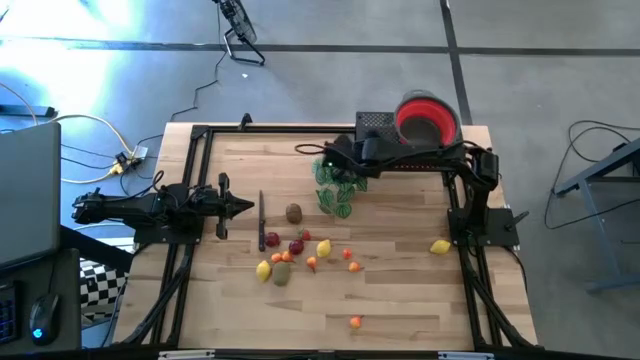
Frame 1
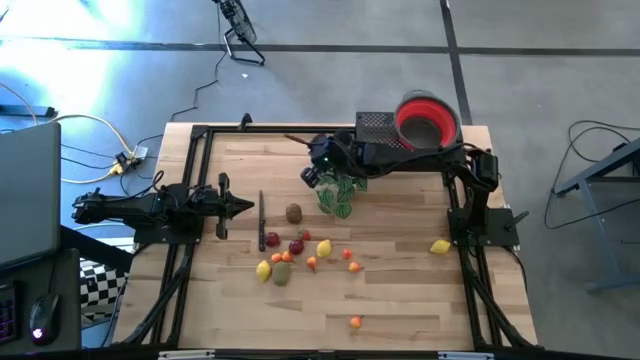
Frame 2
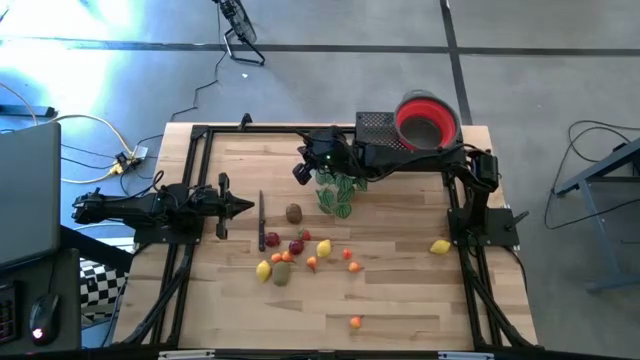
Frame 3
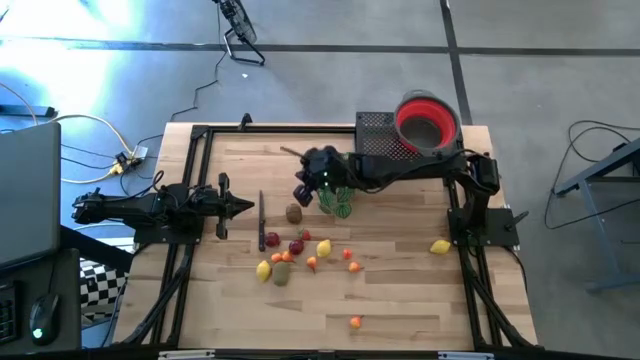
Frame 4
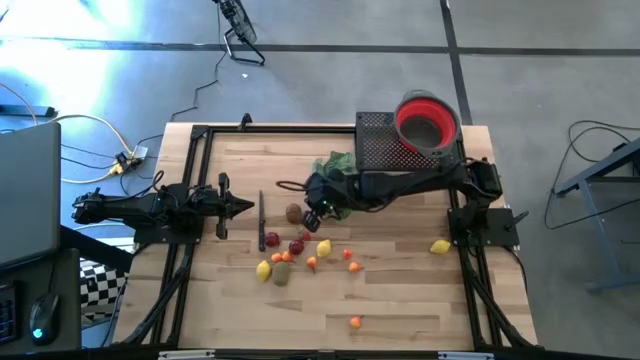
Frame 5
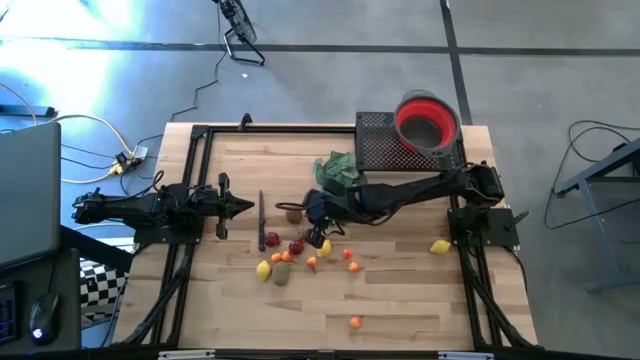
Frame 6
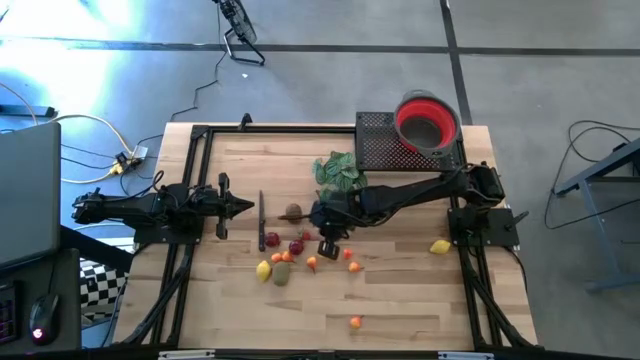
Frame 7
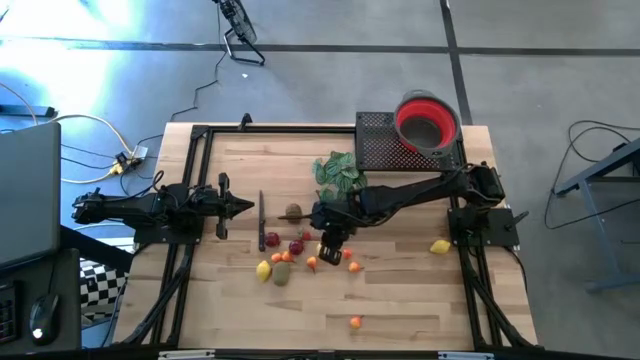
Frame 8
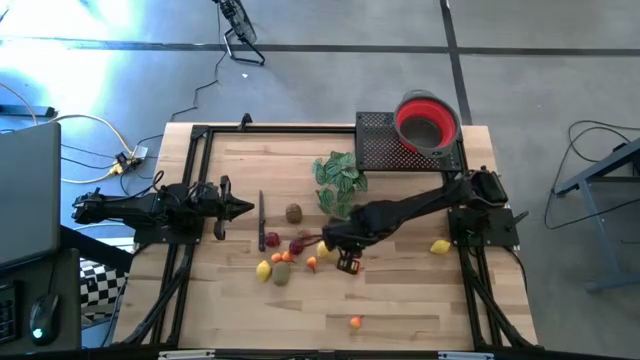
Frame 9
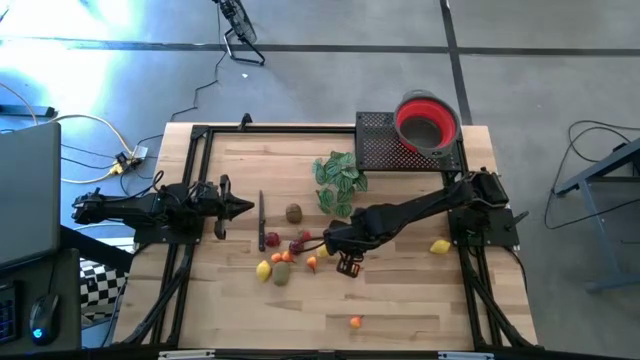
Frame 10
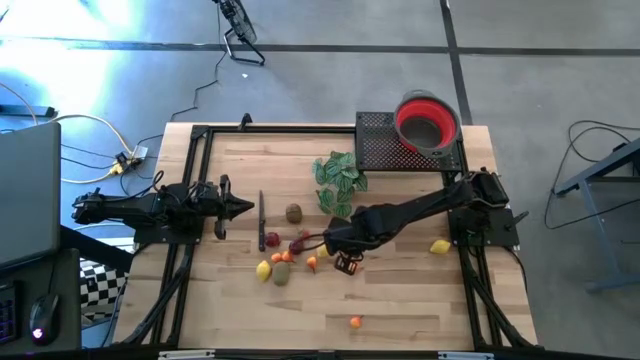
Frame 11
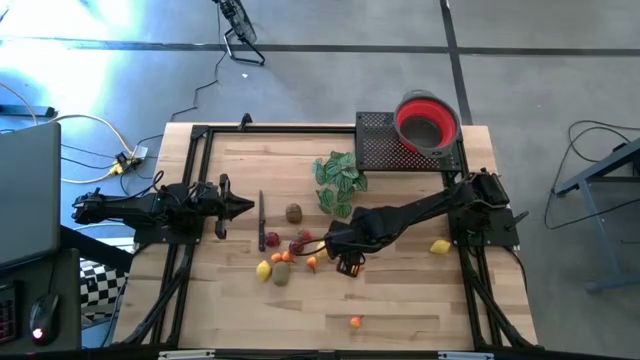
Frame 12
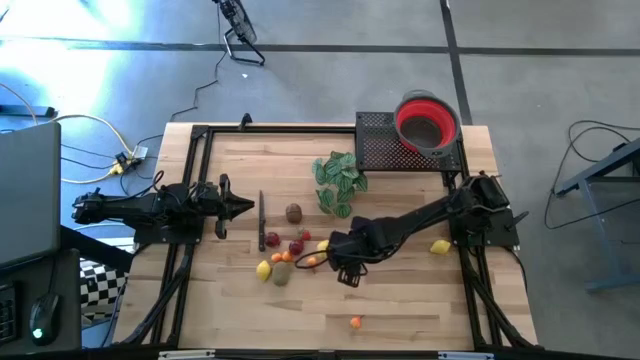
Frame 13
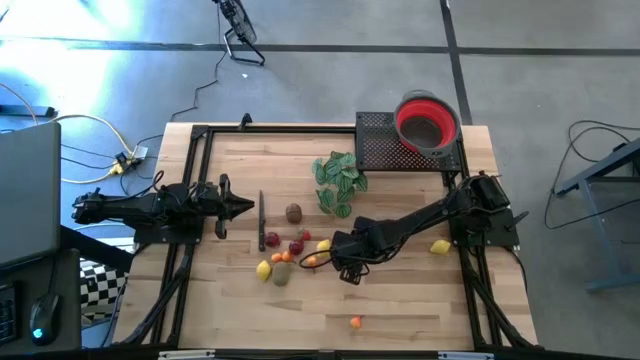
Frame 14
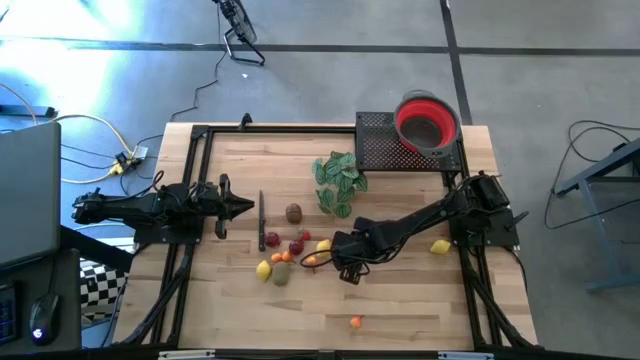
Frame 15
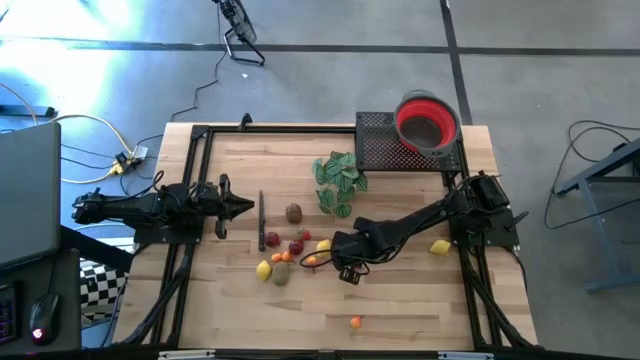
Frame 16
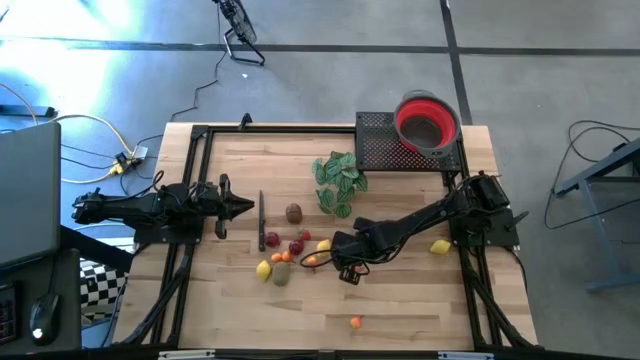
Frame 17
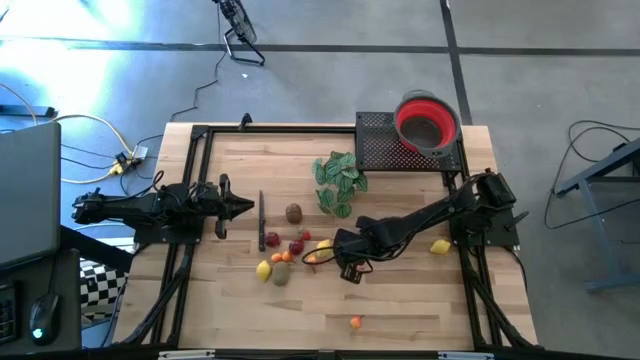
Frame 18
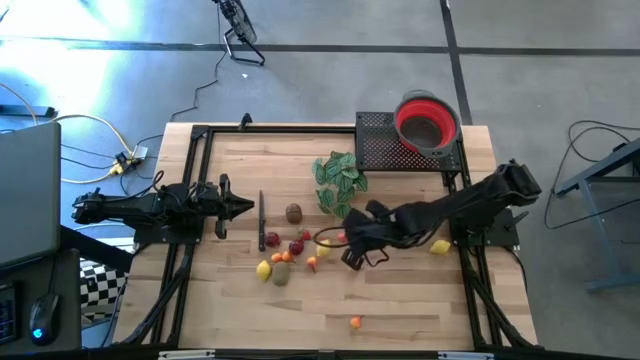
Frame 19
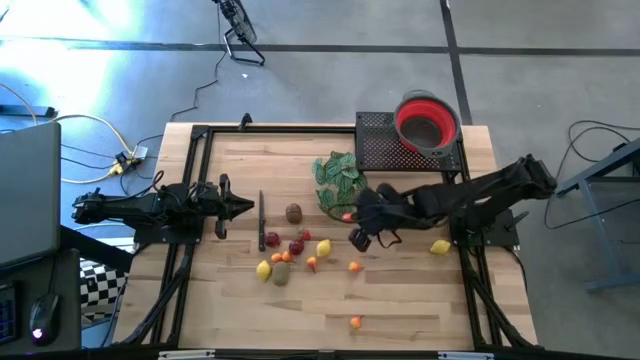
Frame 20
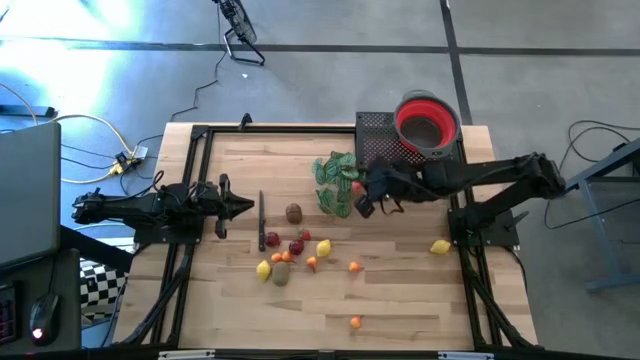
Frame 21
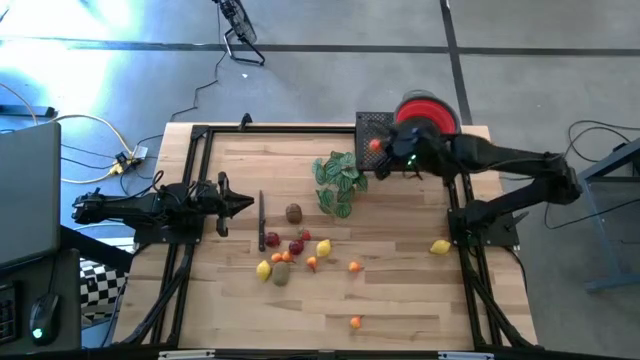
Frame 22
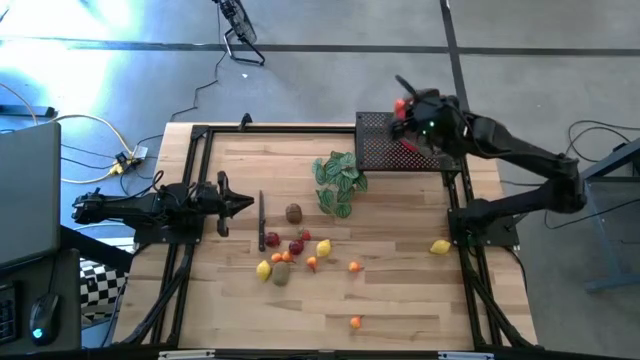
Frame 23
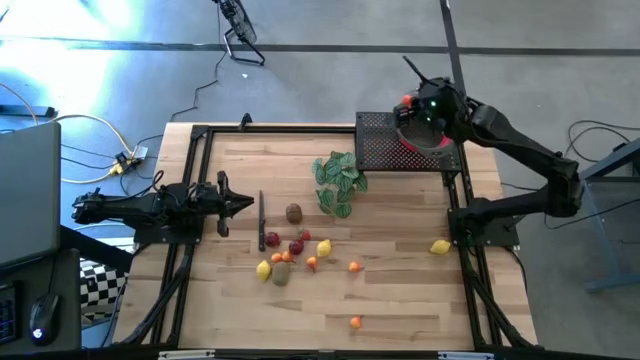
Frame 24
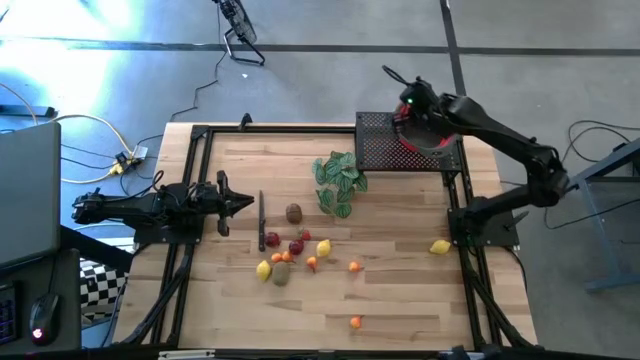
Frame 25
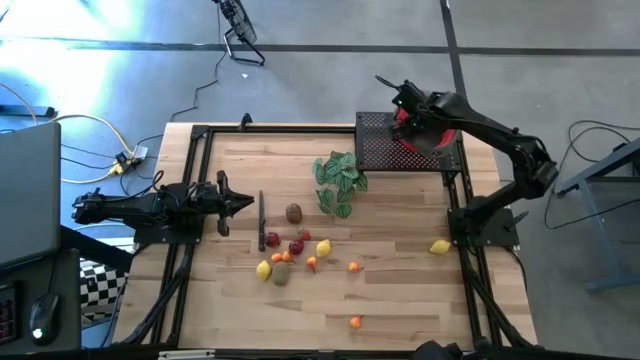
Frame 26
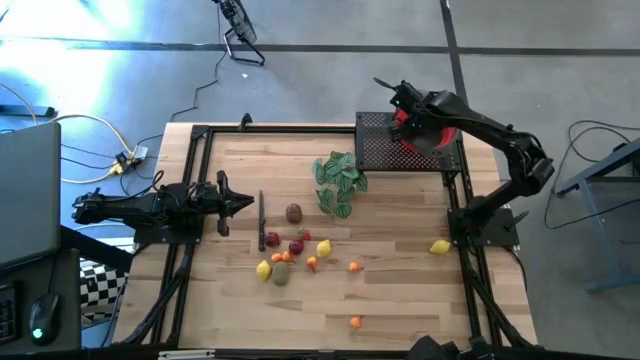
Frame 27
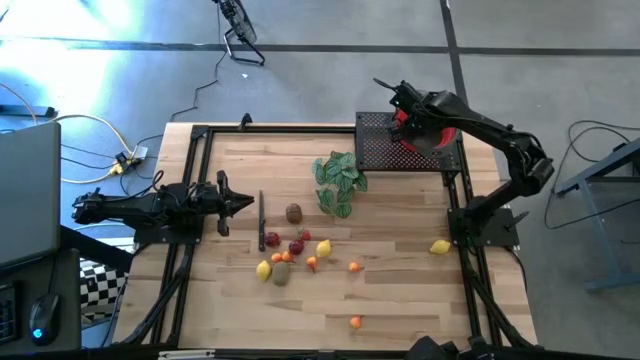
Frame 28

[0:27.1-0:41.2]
Task: Pick & Place Fruit
Put the orange pear into the red colander

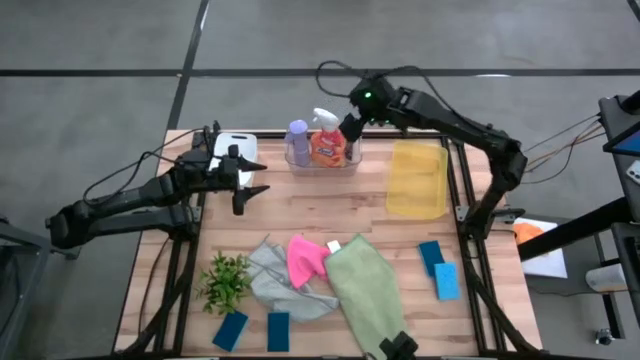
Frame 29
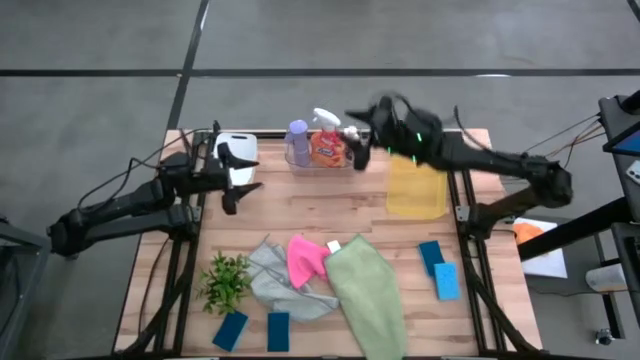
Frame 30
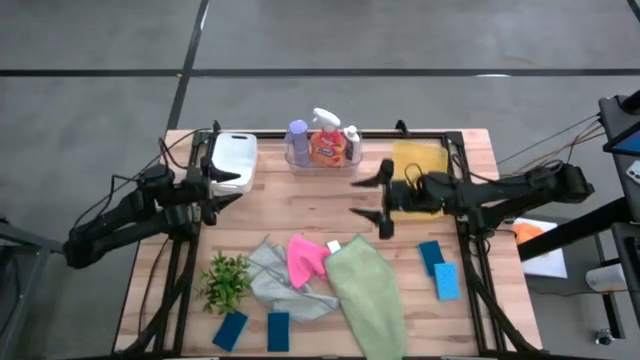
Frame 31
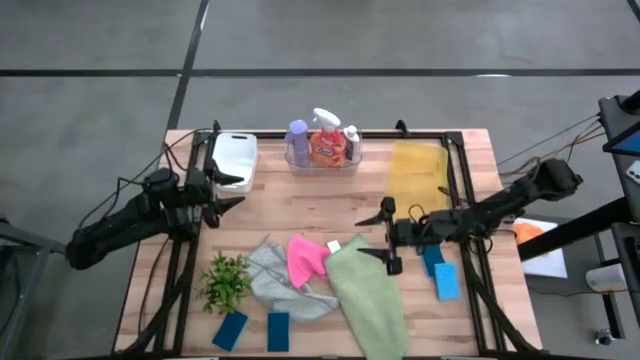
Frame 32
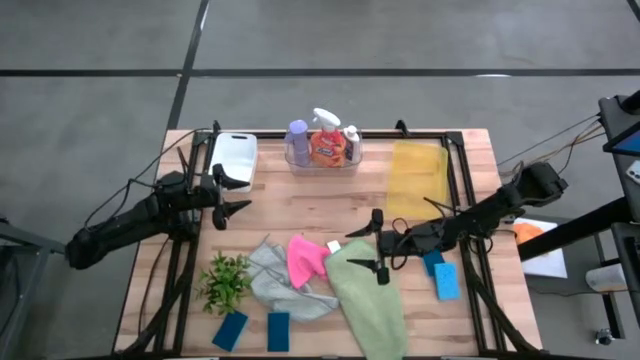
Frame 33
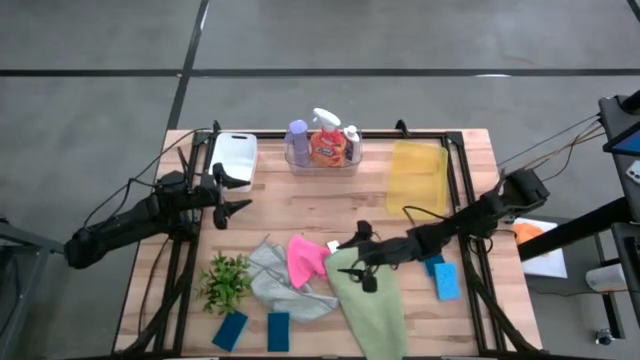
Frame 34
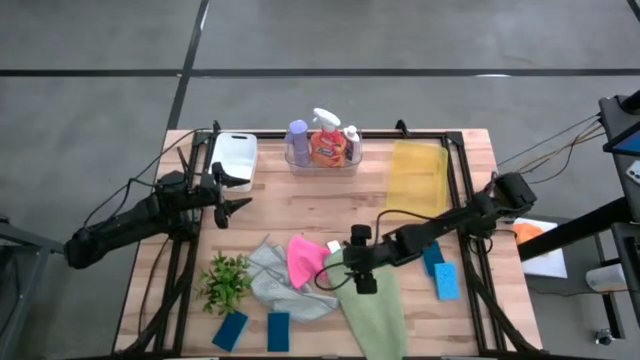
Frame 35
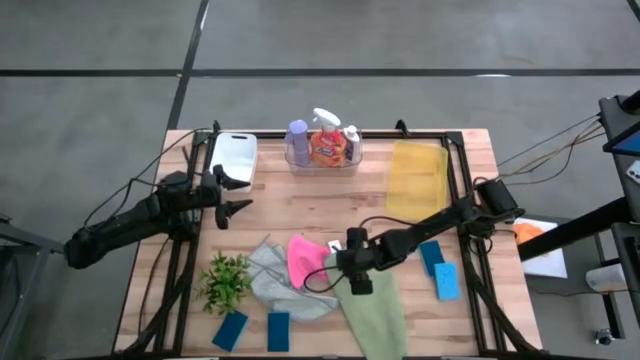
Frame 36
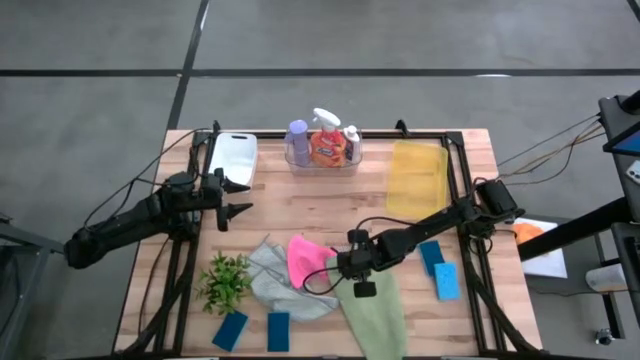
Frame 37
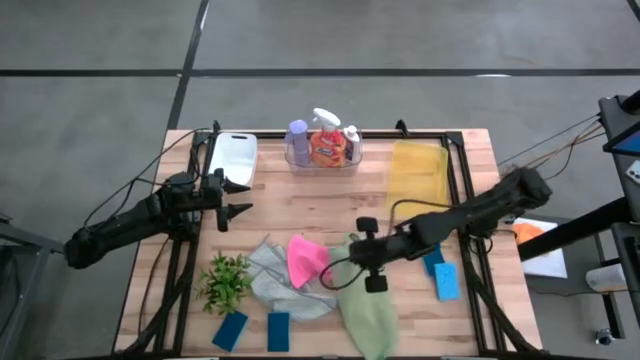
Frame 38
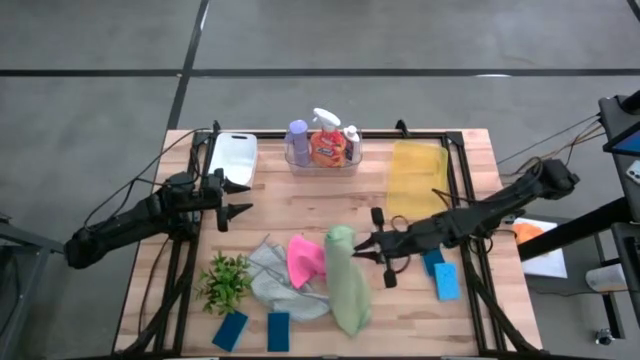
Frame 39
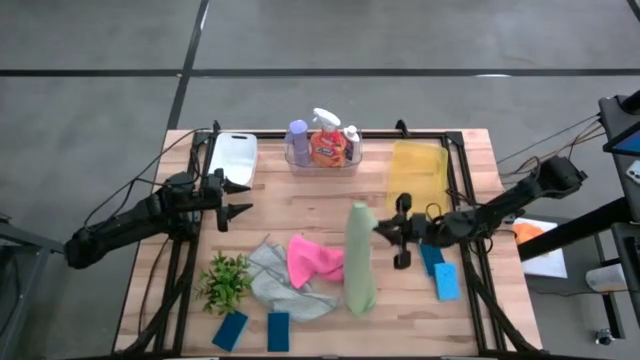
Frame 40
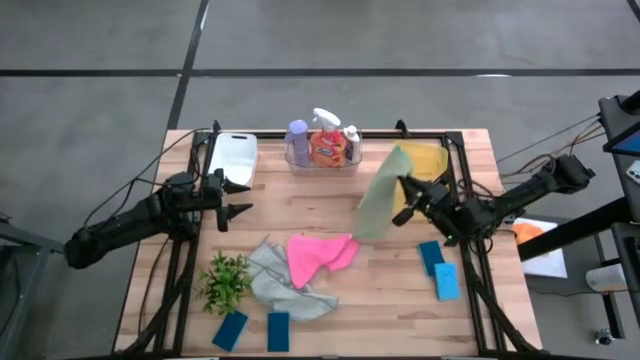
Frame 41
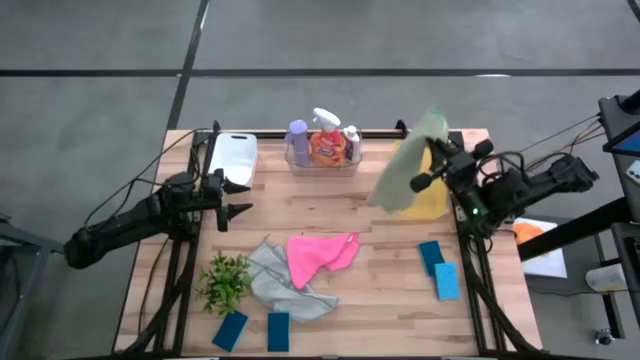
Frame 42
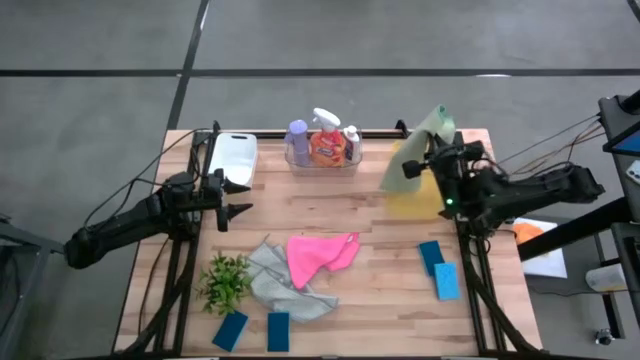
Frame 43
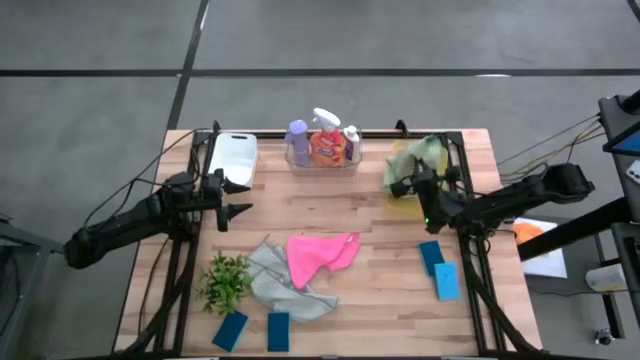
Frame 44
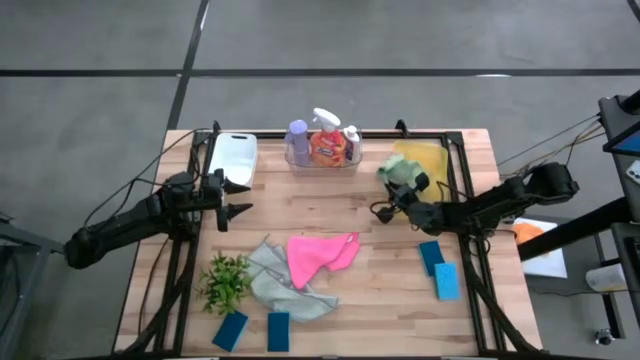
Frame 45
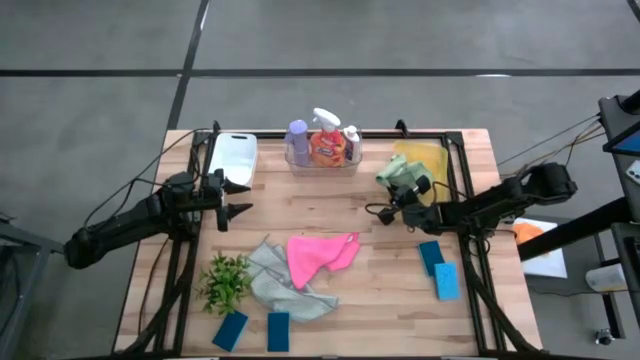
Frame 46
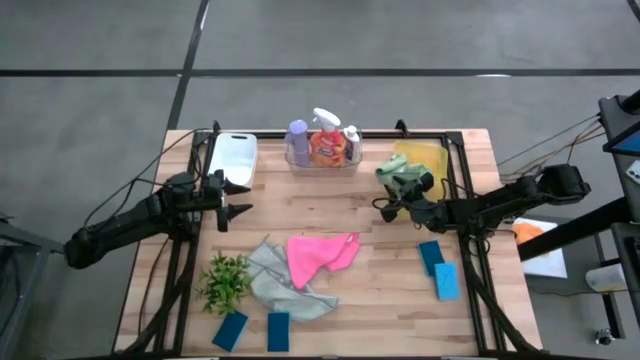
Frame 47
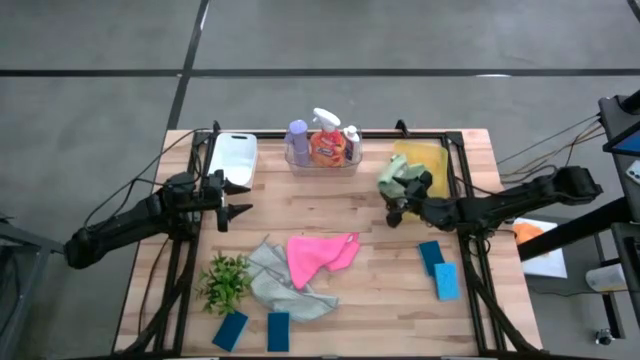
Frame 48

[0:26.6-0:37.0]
Task: Pick & Place Kitchen Items
Put the green towel into the yellow bin
